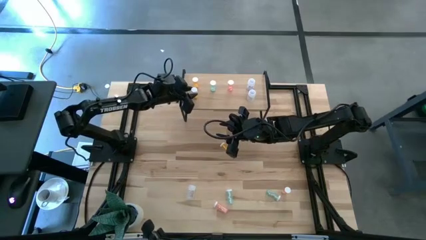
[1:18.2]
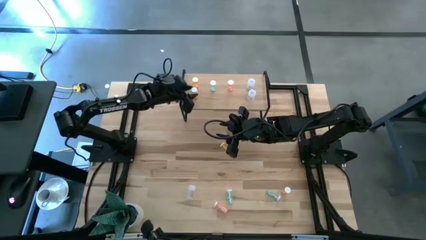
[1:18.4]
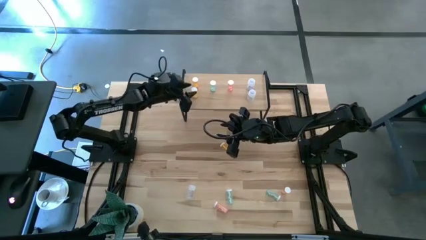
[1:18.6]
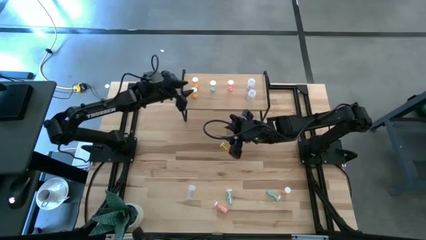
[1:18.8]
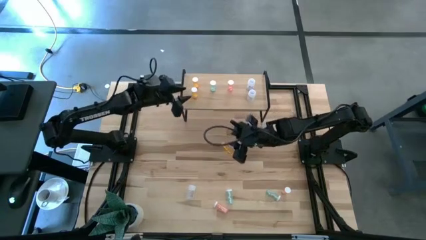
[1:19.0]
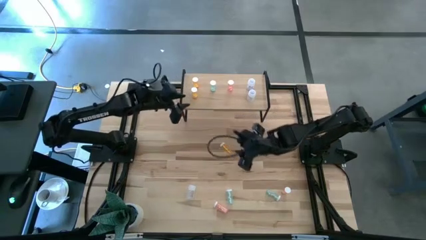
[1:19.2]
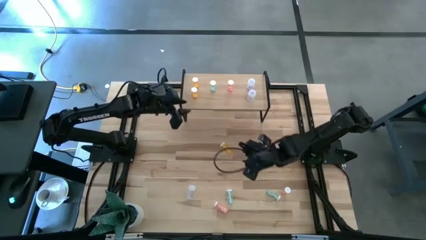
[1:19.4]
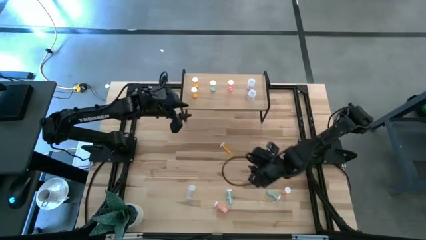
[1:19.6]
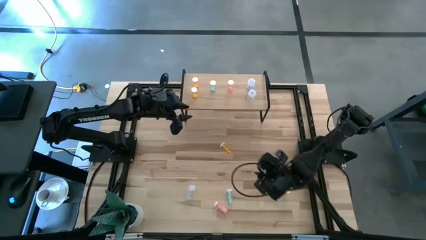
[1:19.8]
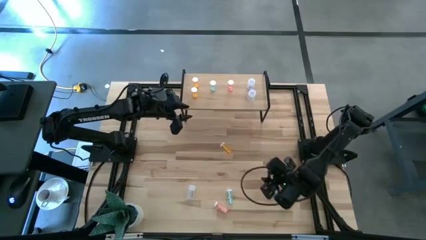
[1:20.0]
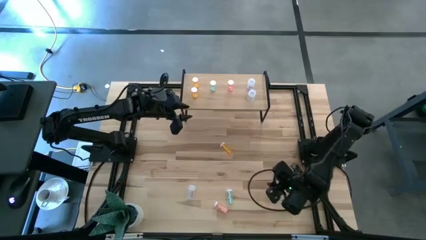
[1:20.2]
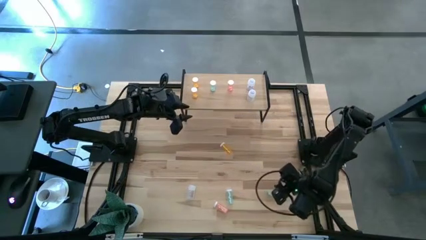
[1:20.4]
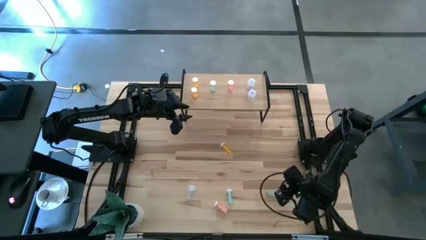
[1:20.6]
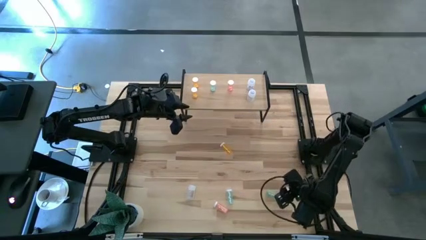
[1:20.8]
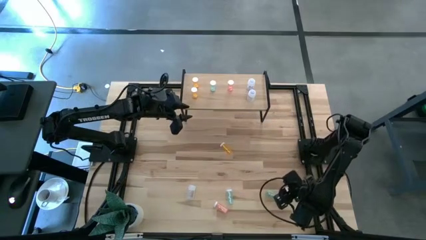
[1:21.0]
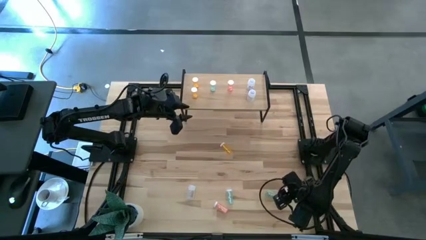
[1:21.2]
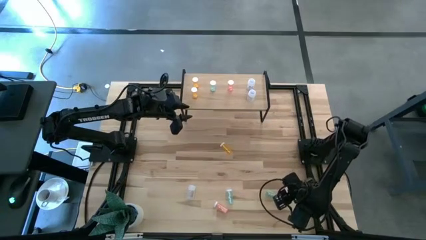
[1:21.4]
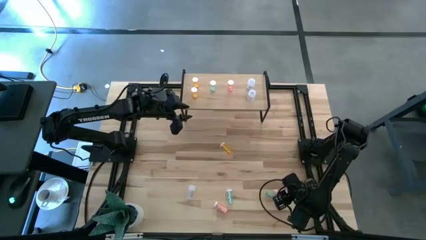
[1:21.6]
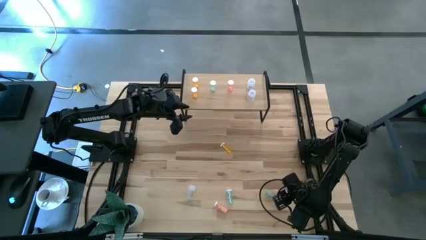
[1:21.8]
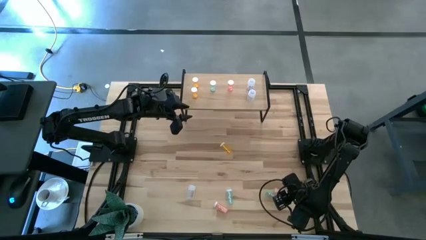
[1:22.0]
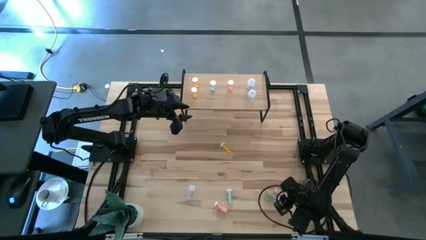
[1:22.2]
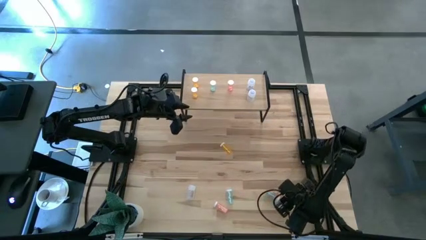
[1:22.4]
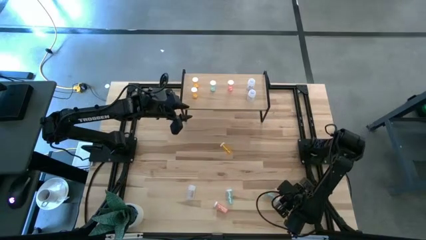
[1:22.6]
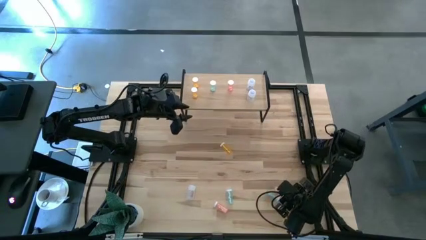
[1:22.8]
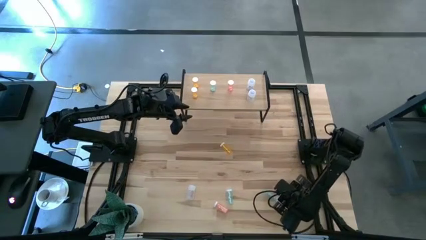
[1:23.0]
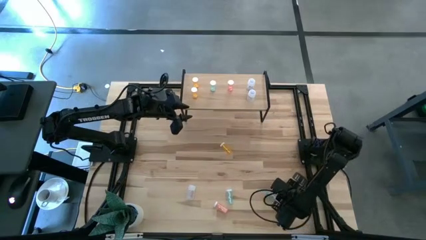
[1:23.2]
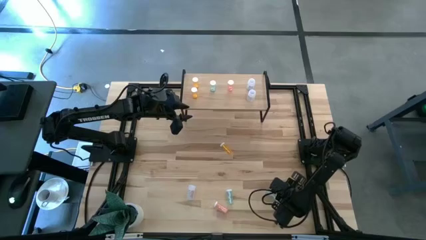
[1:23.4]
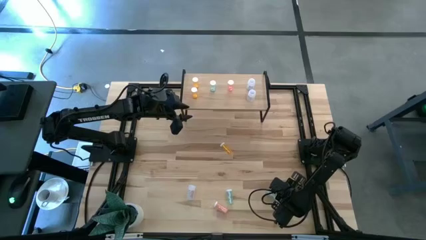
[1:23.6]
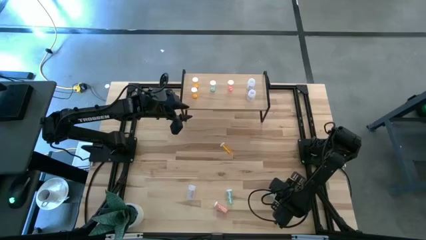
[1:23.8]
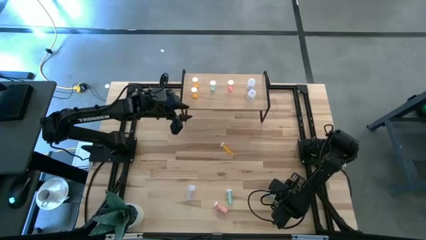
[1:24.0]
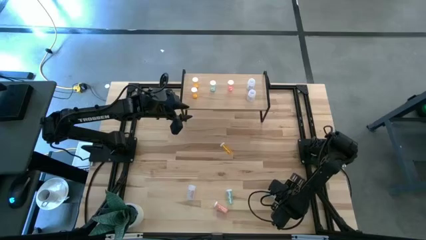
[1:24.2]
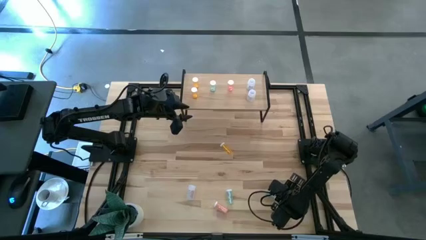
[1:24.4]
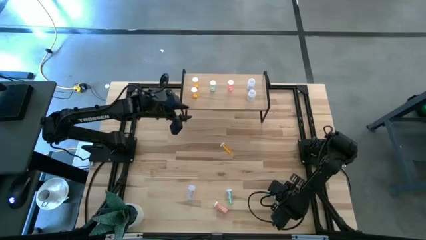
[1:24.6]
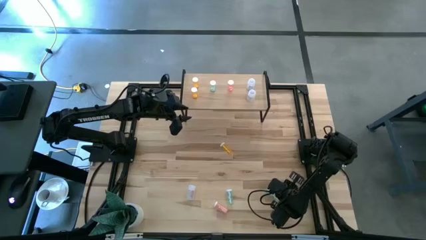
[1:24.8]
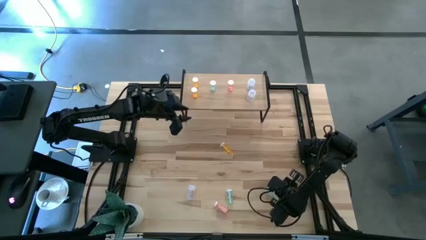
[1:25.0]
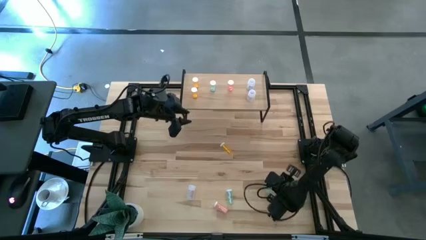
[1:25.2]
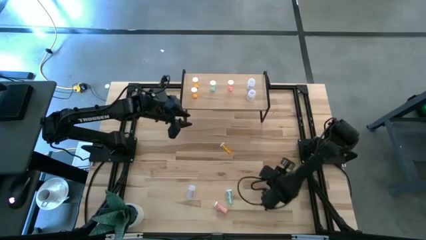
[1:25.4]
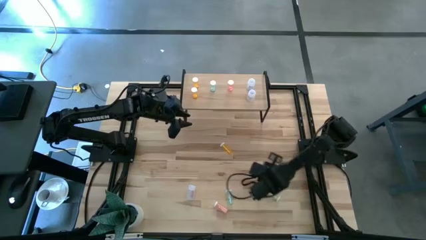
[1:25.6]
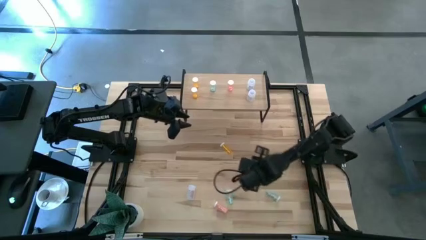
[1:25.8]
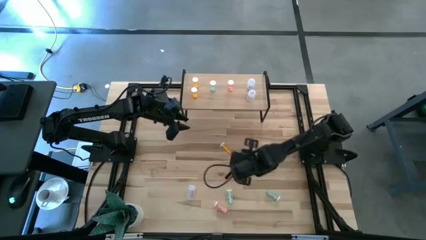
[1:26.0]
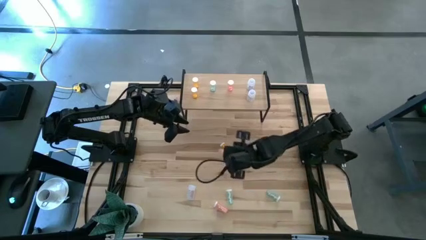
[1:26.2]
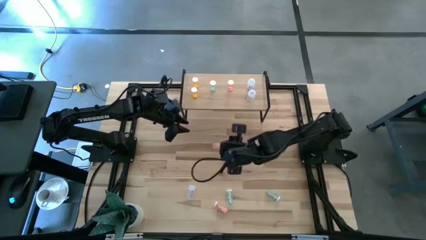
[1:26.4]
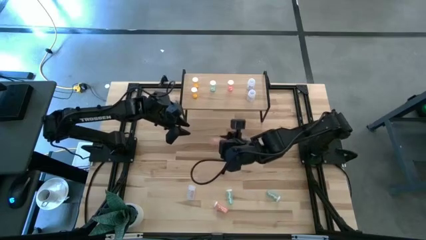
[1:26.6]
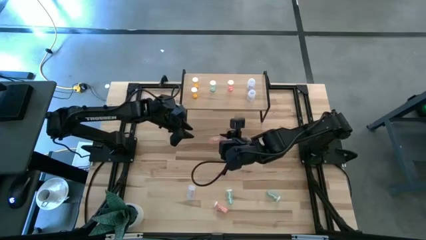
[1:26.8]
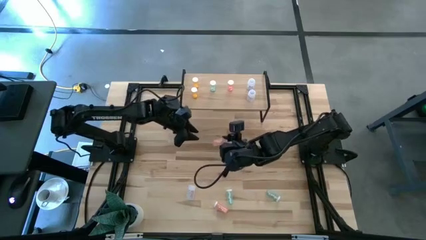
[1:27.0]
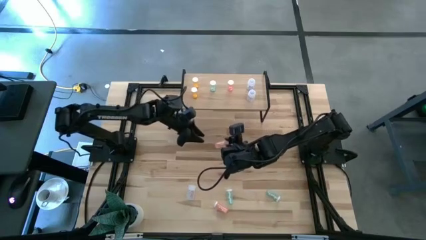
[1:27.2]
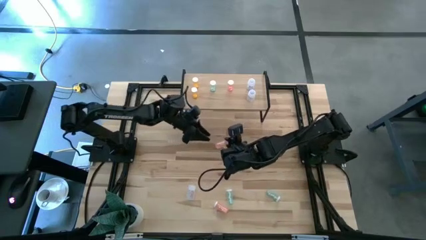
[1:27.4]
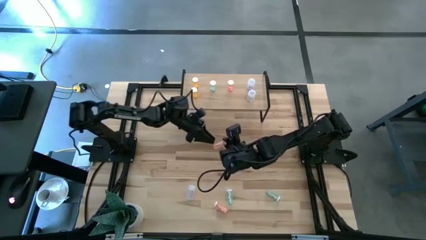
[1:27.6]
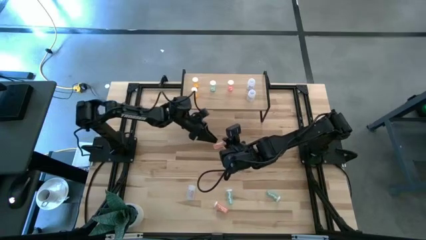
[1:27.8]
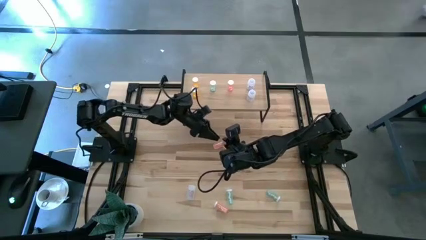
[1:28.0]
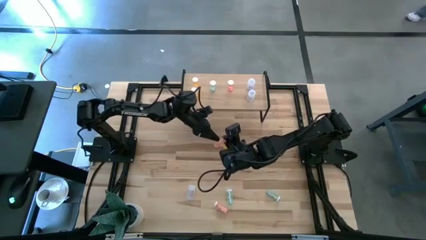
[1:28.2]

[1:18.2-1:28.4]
Task: Pick and place medicine bottles onto shelf by color
Put the pink pill bottle on the shelf aligned with the pink pill bottle

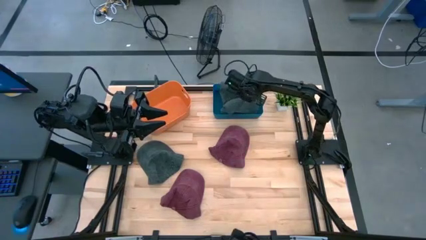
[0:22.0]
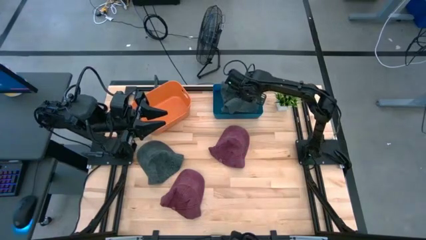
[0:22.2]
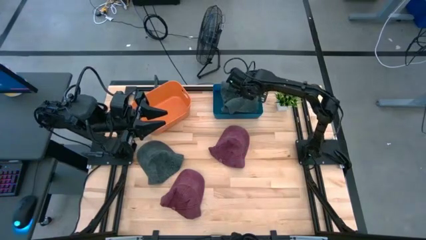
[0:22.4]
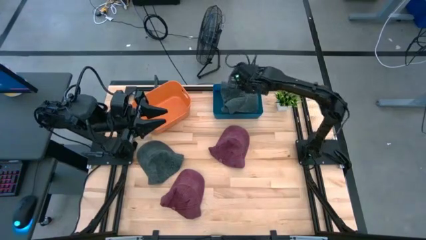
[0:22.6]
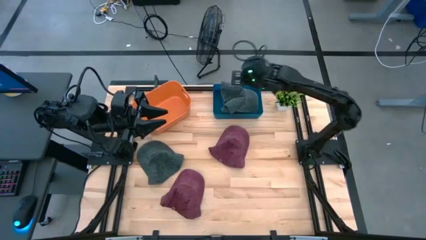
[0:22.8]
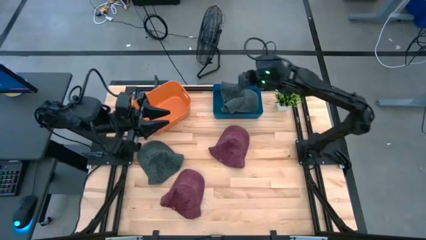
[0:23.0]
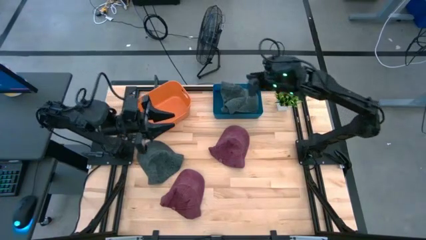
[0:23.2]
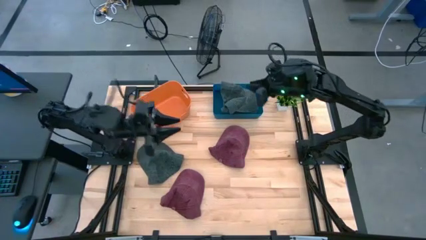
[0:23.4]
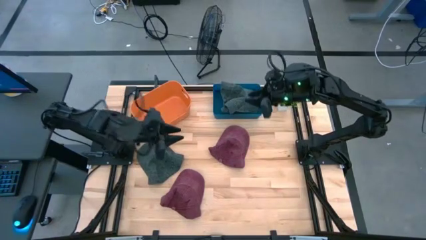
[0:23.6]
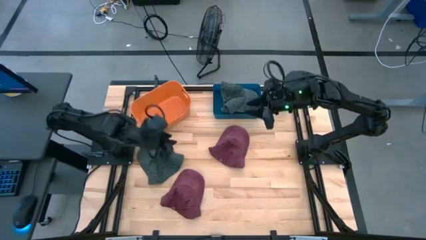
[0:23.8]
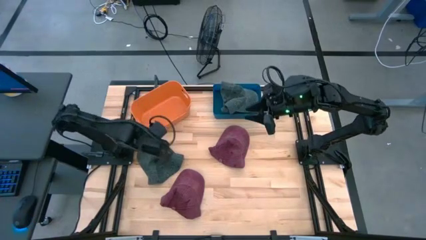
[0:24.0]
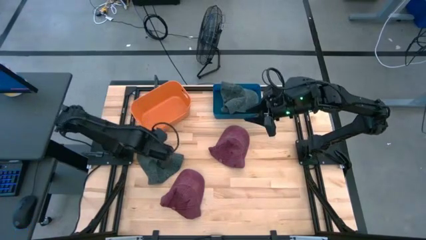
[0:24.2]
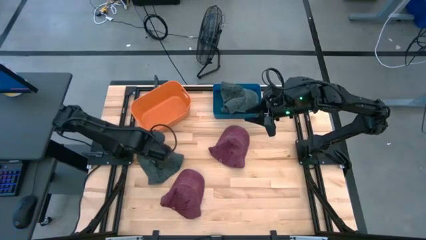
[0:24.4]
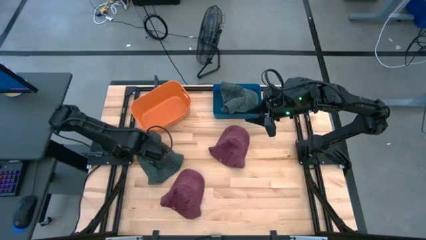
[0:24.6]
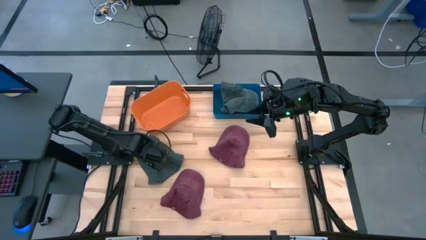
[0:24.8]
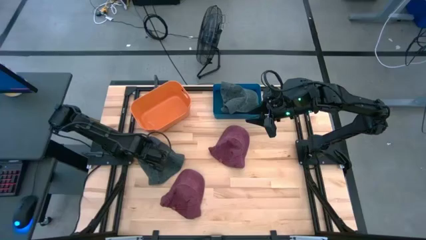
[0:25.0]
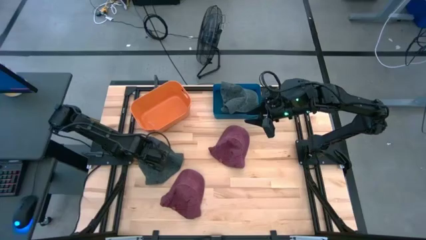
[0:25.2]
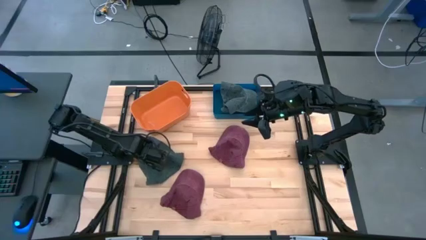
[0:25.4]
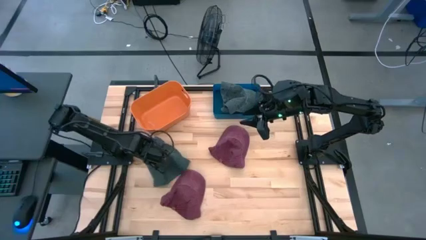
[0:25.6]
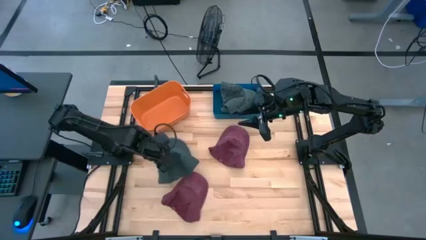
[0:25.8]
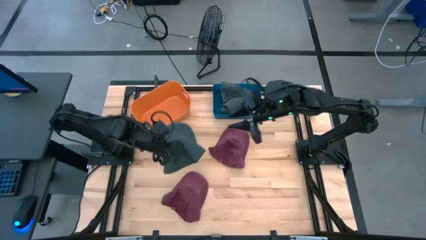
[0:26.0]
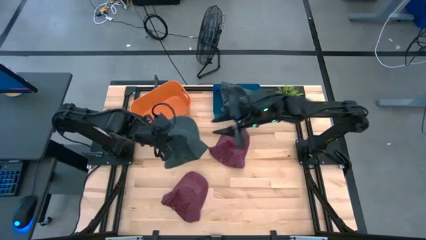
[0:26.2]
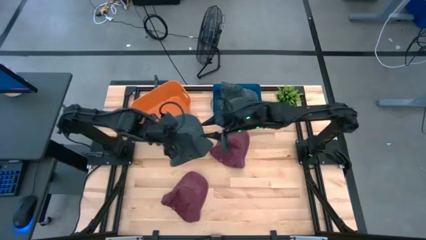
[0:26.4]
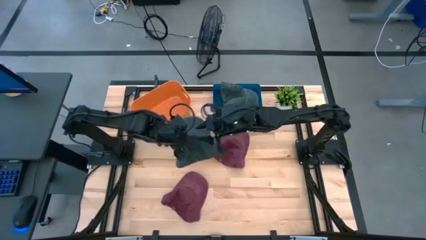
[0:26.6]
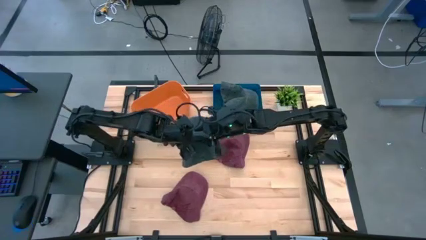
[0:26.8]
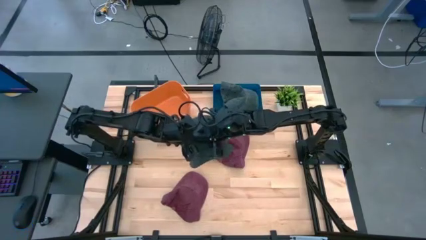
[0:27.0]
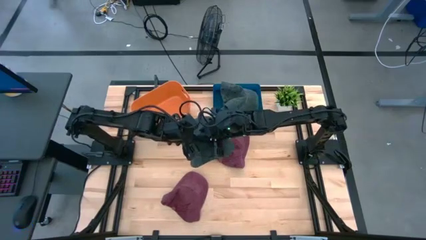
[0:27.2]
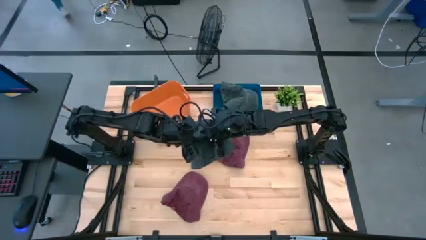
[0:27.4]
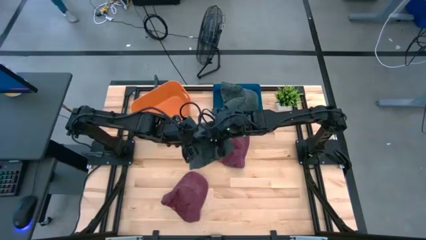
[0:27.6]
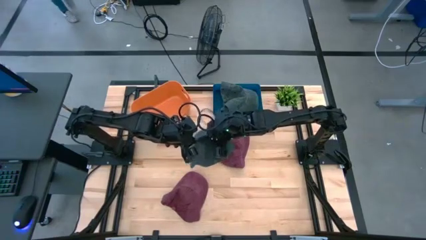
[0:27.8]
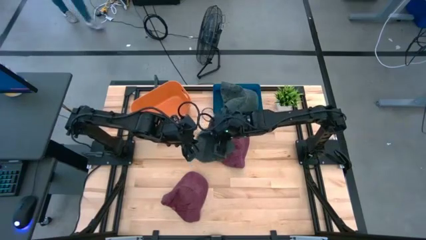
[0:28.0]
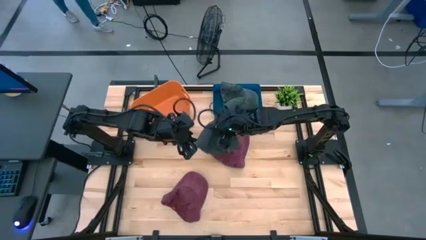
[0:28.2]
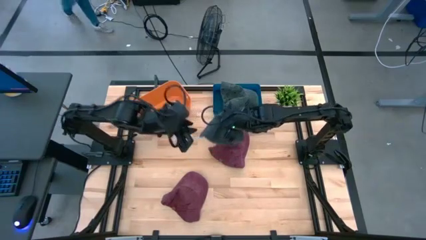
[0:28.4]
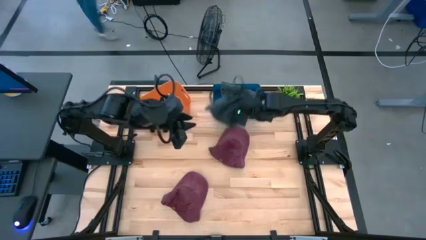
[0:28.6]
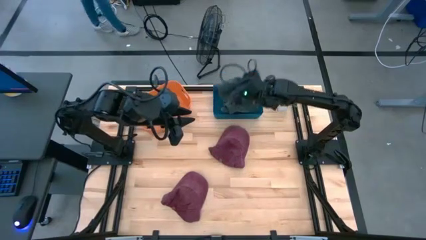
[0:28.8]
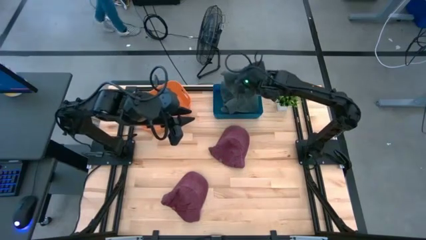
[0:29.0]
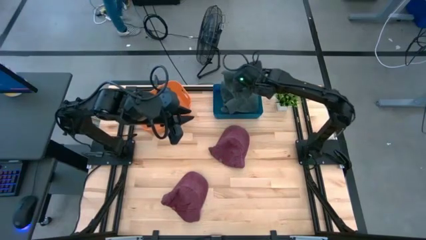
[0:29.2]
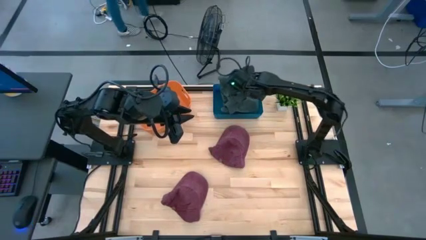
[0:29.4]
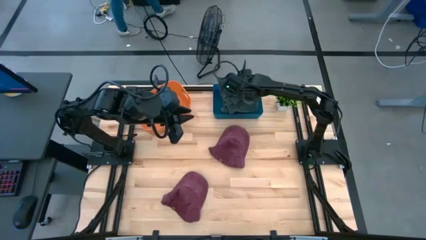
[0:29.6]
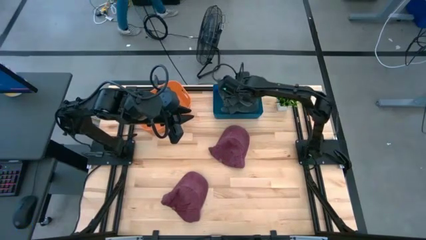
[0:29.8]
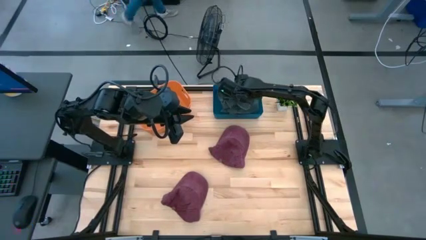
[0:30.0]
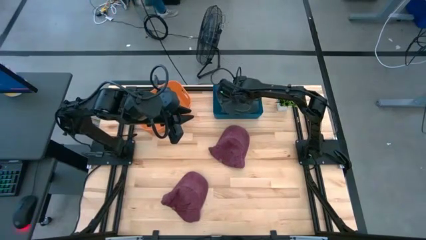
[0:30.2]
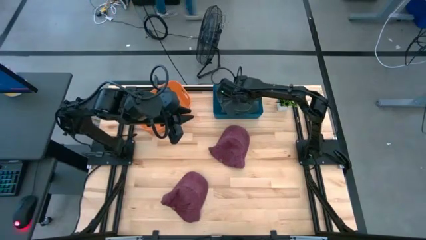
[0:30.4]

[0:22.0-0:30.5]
Task: Pick & Place hat
Put the black cap into the blue bin
